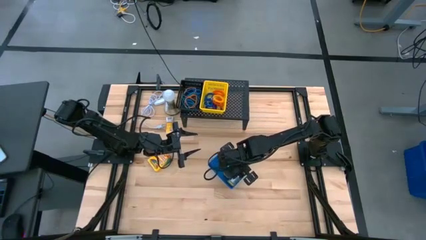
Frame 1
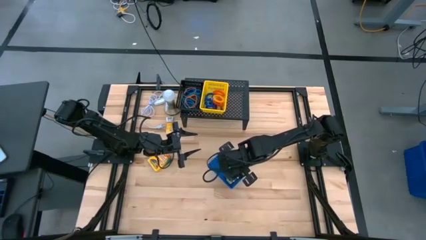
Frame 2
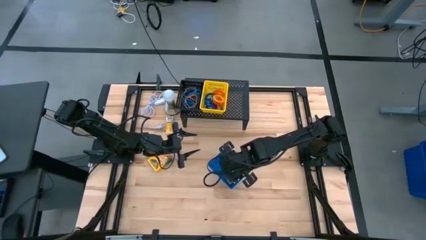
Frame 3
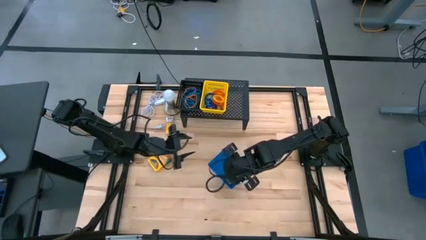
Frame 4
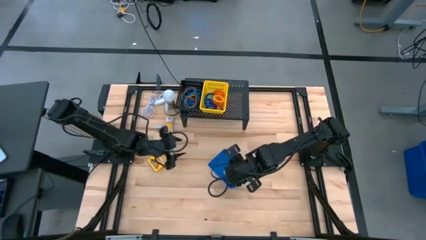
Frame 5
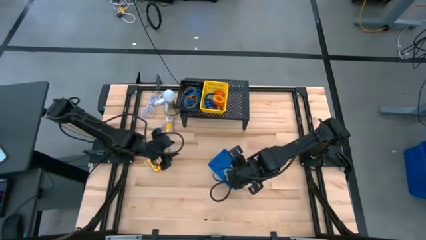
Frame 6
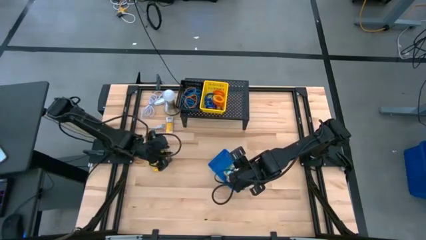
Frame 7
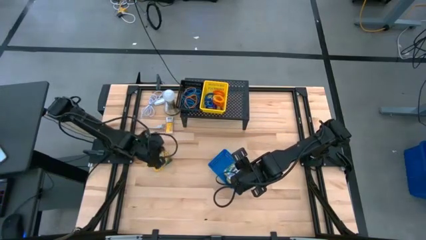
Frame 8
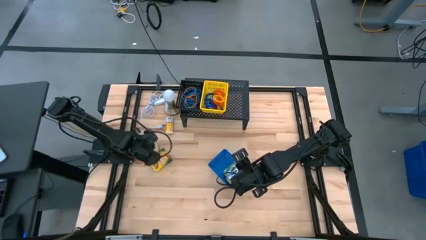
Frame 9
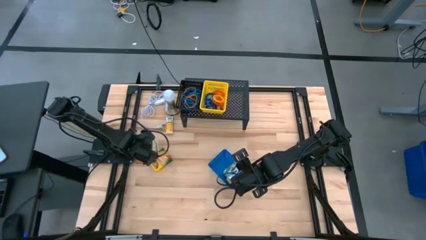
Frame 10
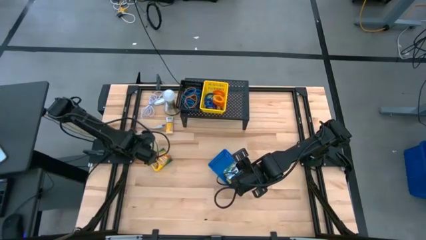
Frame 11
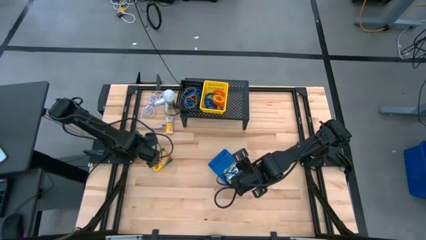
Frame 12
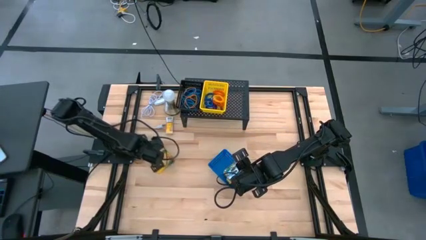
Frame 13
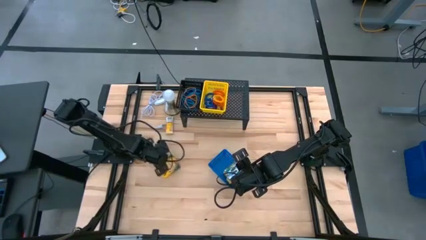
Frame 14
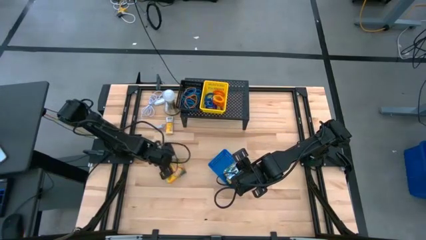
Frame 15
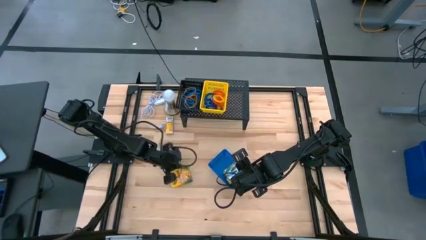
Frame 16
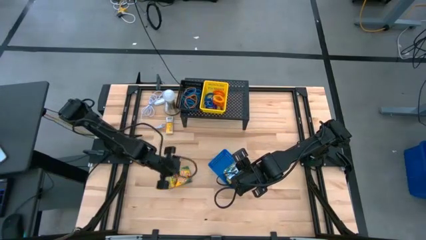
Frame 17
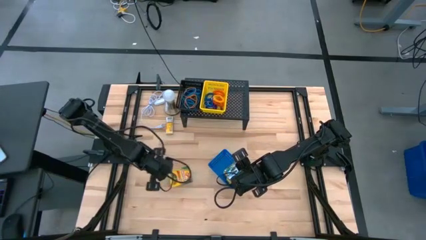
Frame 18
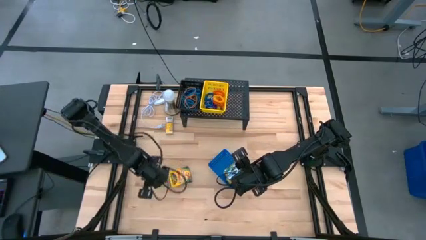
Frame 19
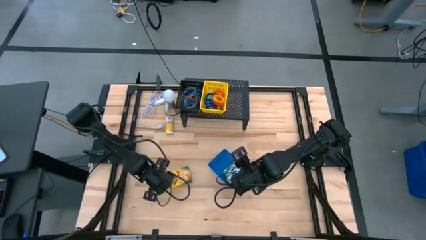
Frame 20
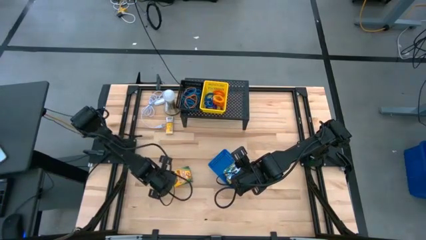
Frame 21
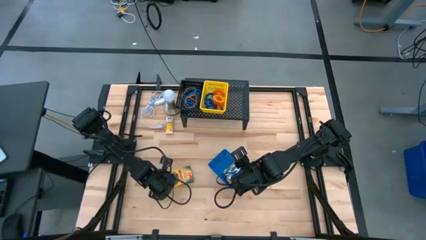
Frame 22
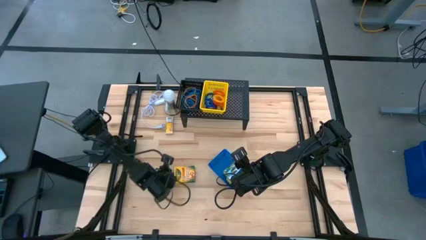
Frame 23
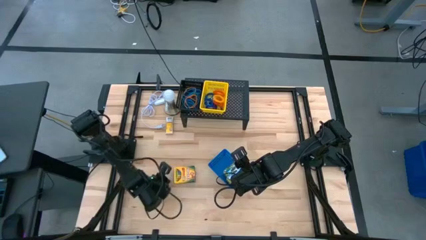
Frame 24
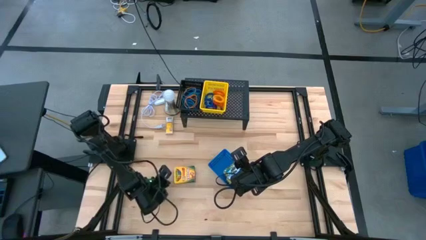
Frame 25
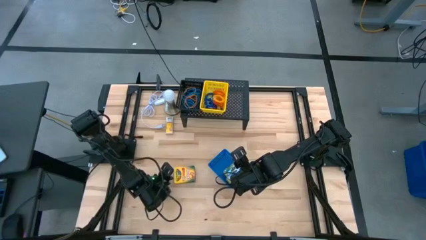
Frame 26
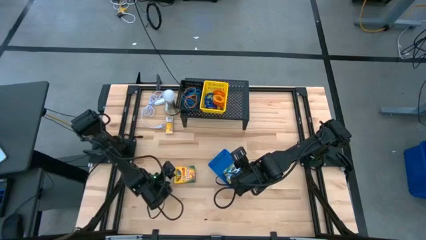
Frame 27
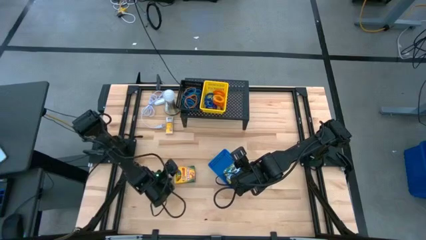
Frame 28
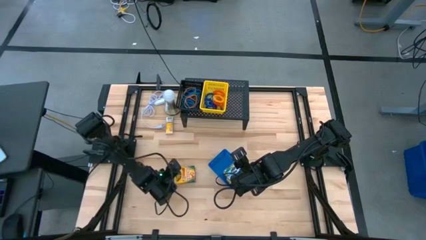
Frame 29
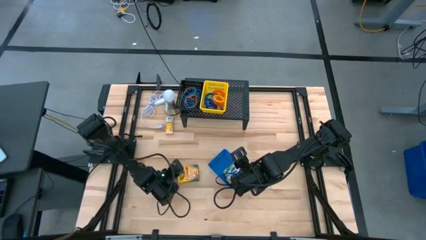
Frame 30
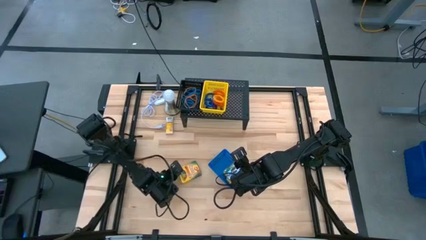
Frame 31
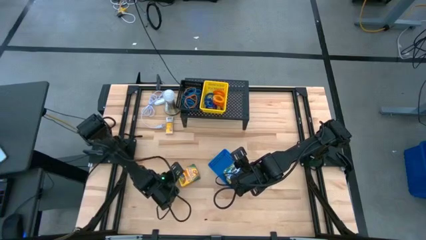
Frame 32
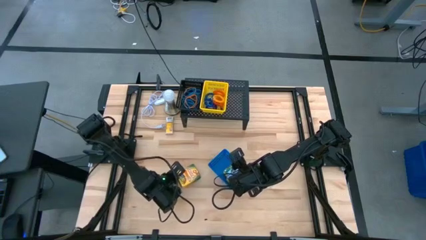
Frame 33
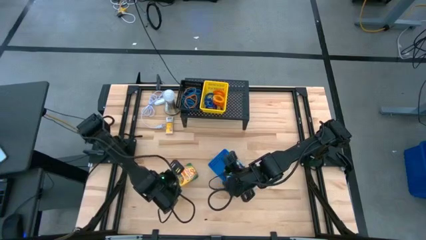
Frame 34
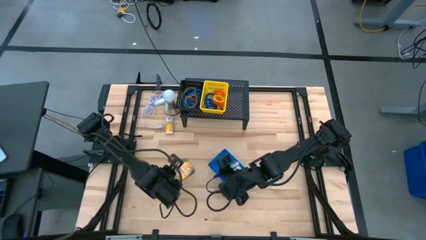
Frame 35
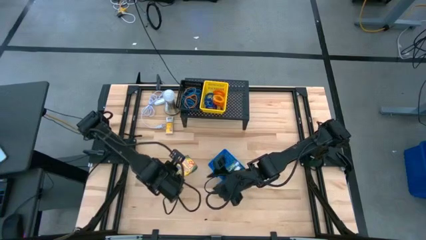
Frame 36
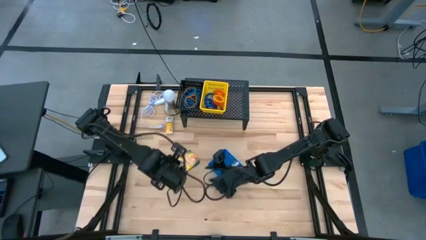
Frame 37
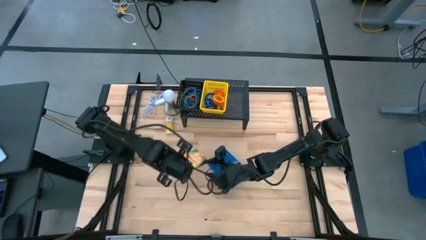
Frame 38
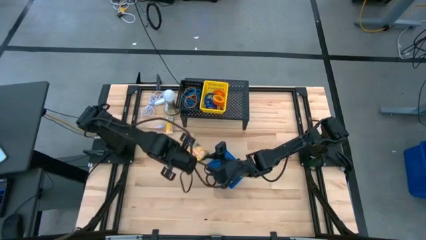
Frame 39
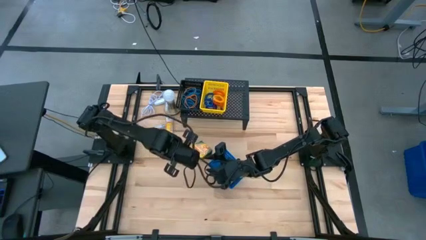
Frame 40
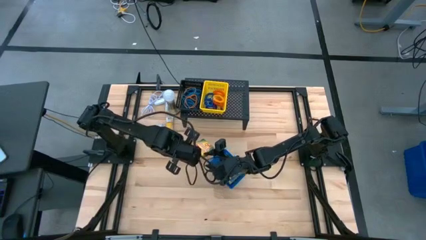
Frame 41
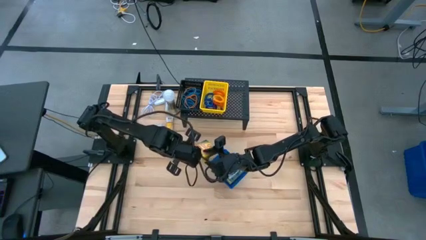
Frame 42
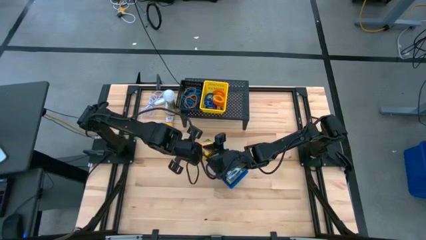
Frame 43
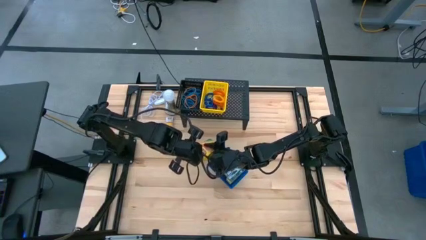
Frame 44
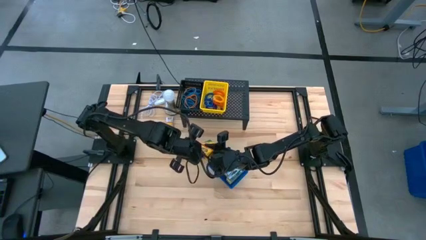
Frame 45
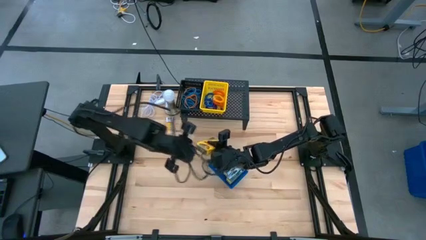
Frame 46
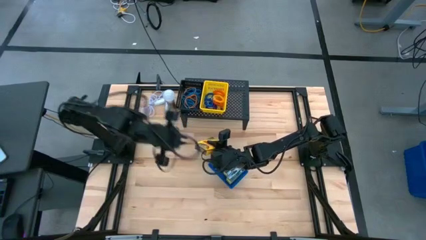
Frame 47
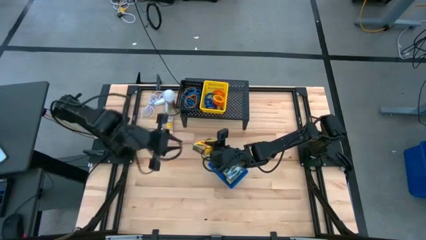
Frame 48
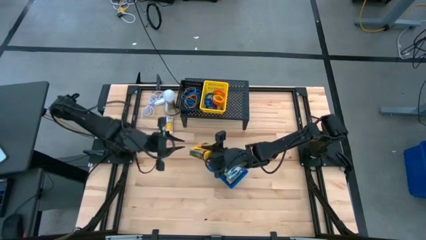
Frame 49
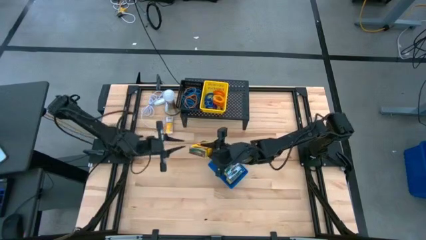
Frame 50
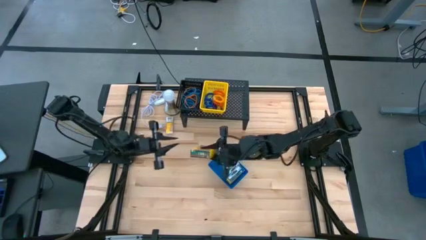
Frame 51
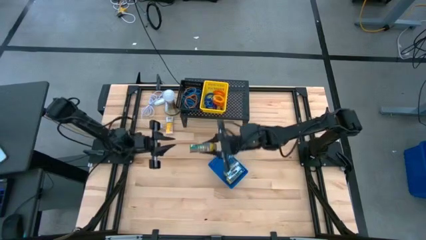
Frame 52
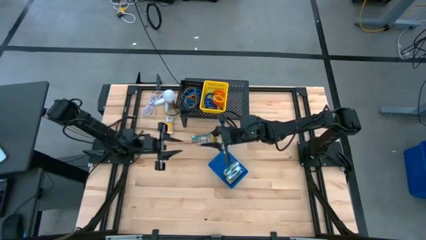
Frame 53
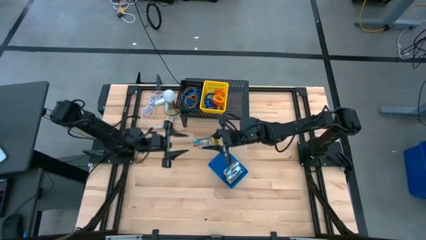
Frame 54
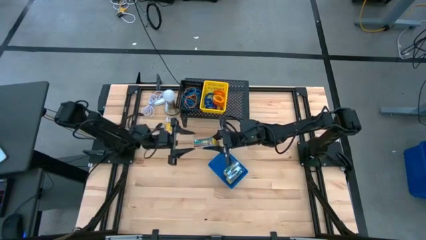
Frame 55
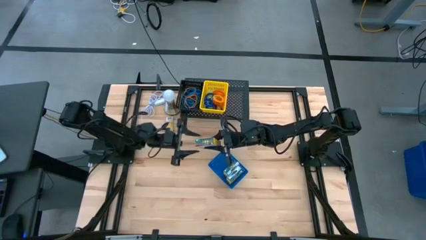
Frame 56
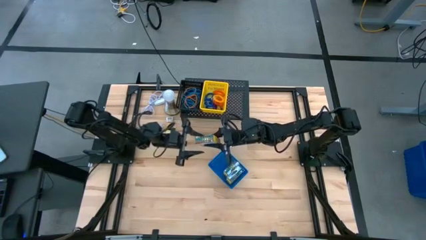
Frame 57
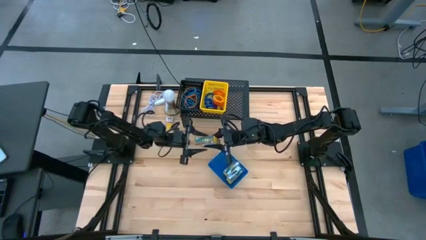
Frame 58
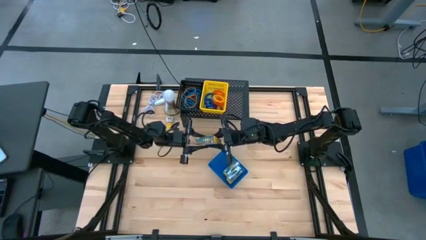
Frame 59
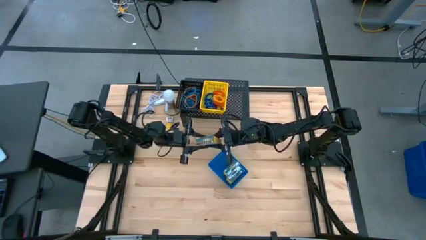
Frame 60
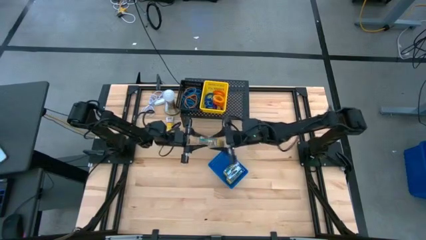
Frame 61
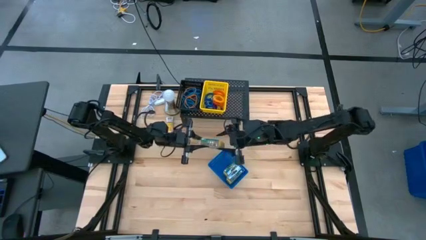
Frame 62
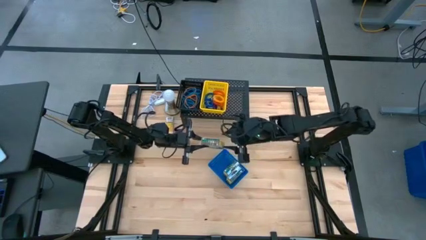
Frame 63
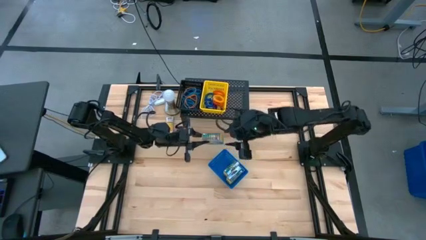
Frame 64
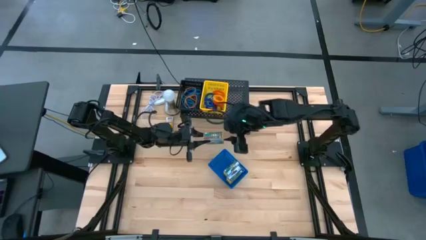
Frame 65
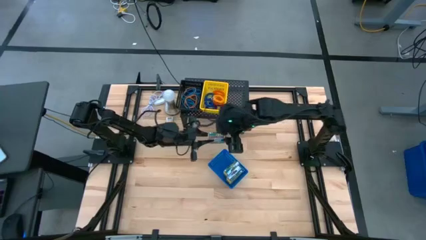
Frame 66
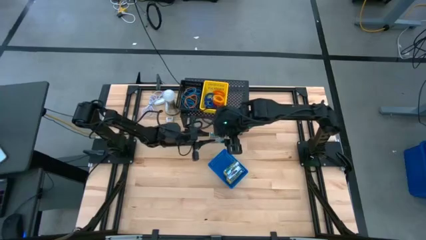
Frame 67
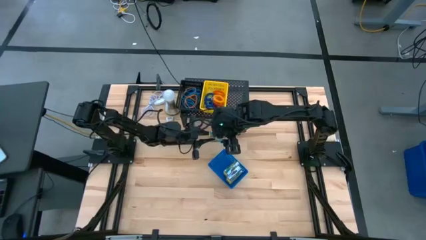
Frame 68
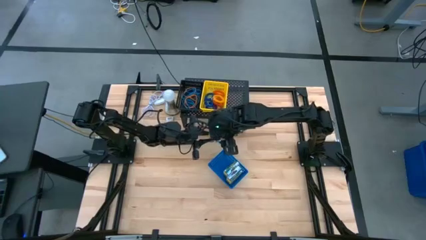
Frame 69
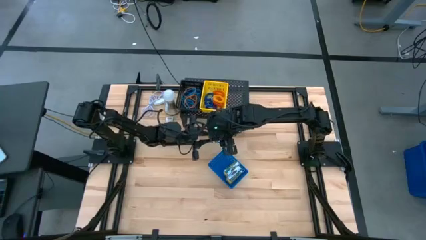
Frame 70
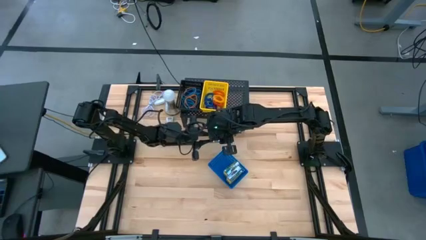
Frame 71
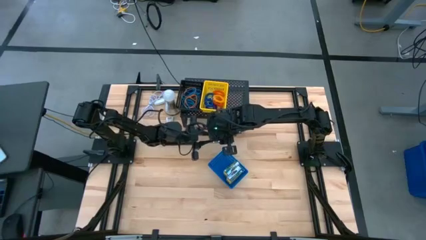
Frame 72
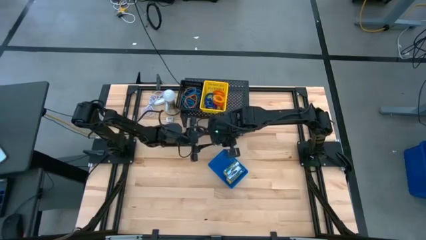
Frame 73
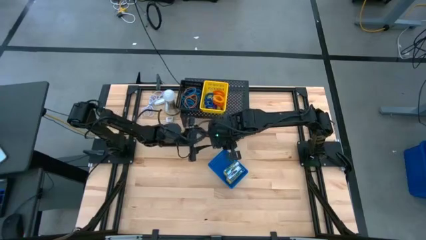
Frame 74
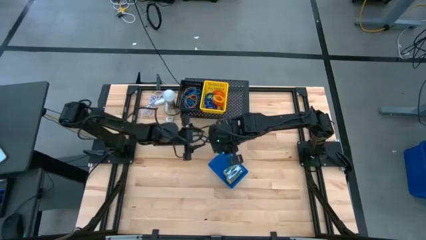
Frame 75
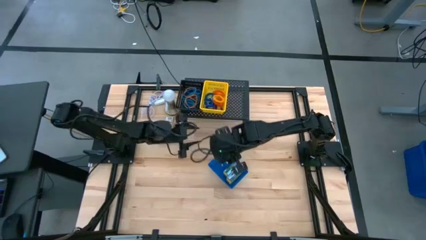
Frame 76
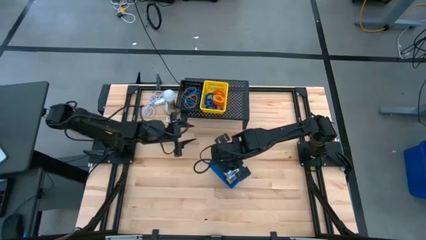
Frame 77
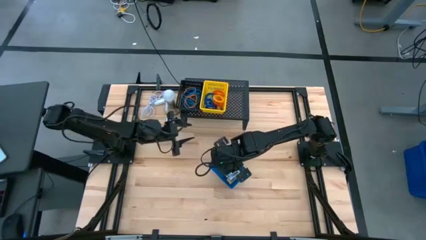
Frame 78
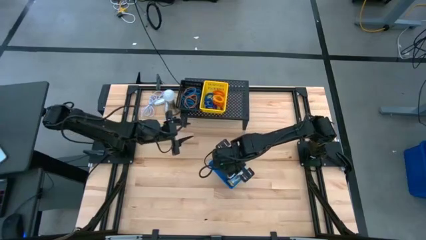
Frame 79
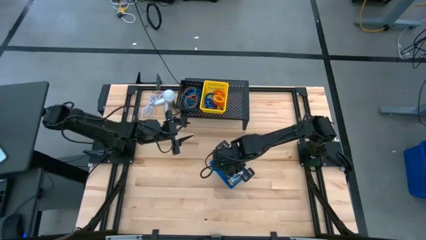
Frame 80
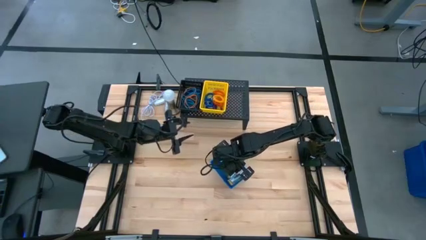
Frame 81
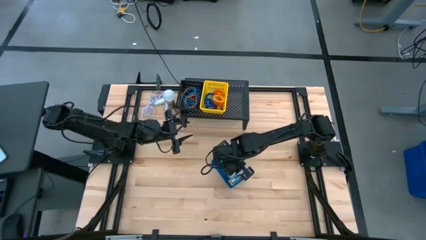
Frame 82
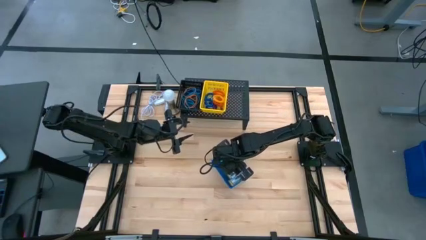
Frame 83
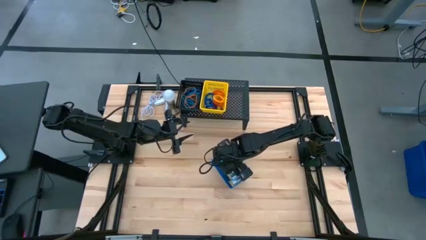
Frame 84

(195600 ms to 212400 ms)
Task: Pick & Place Office Desk Supplies
Put the big yellow crayon box into the blue basket
